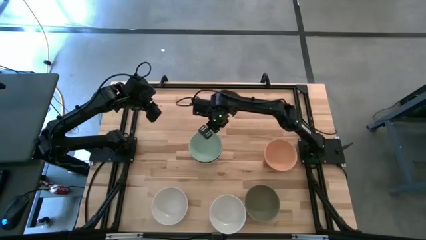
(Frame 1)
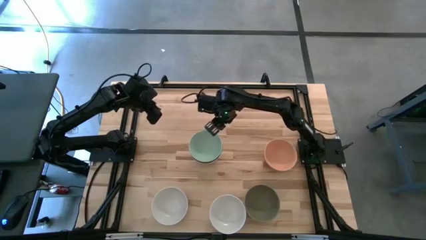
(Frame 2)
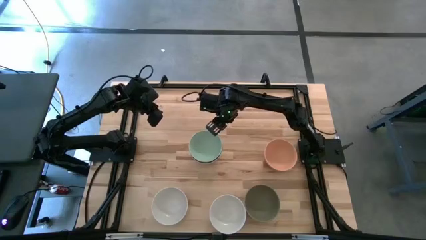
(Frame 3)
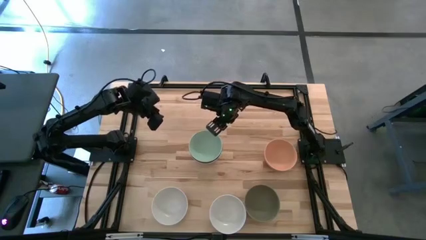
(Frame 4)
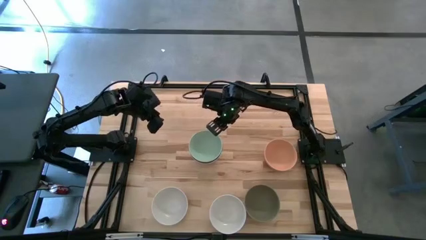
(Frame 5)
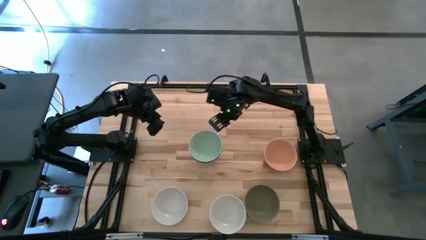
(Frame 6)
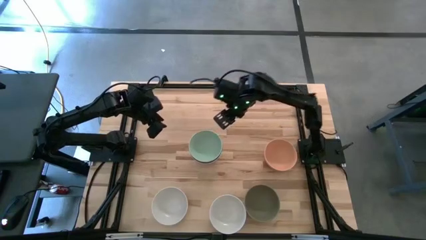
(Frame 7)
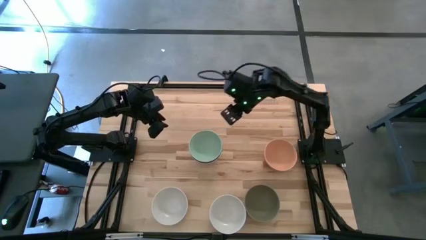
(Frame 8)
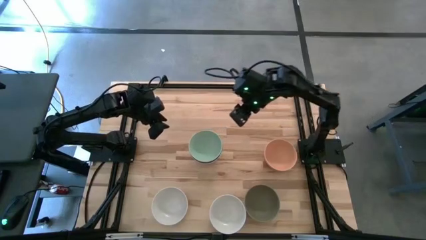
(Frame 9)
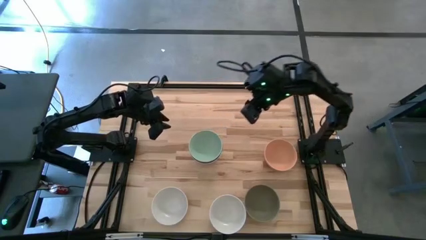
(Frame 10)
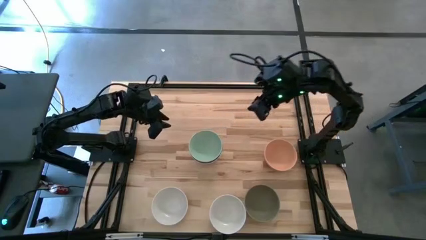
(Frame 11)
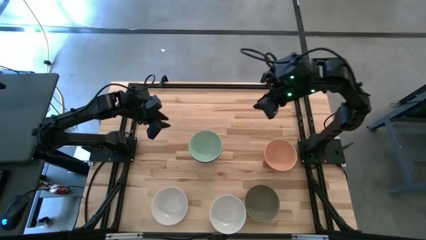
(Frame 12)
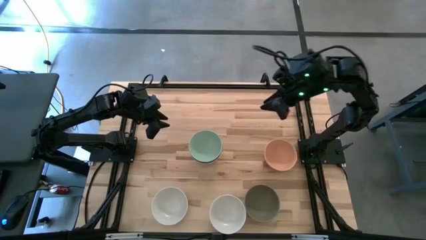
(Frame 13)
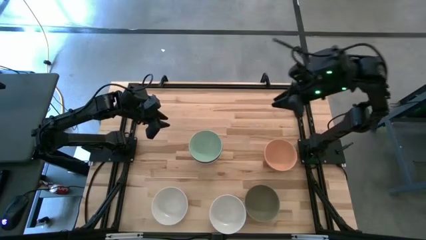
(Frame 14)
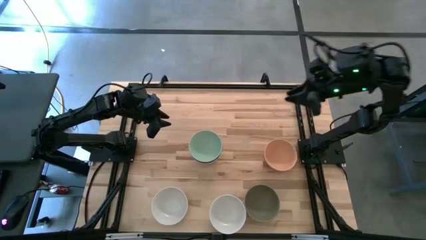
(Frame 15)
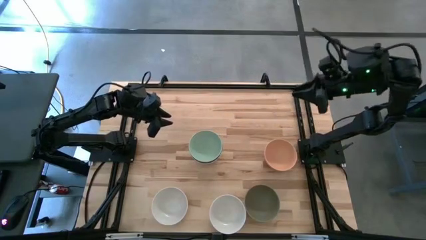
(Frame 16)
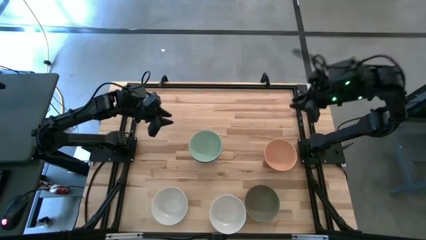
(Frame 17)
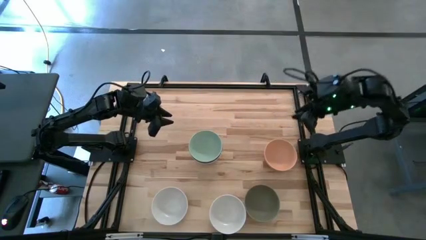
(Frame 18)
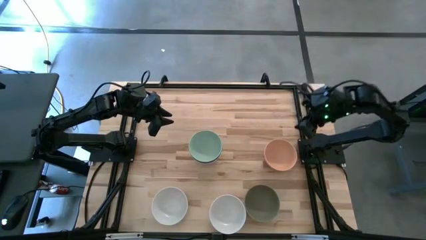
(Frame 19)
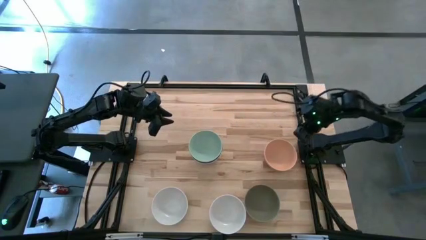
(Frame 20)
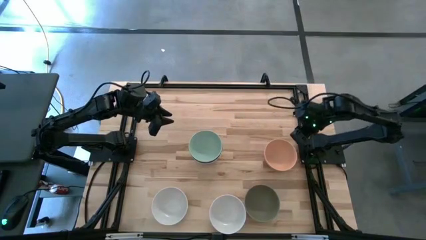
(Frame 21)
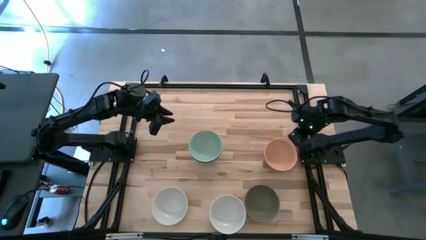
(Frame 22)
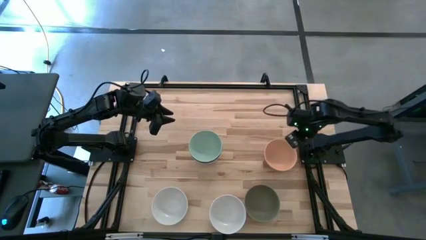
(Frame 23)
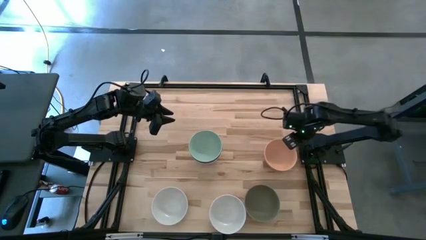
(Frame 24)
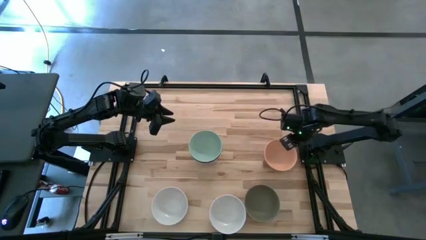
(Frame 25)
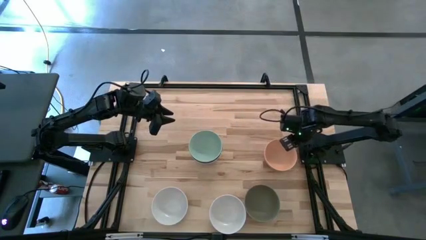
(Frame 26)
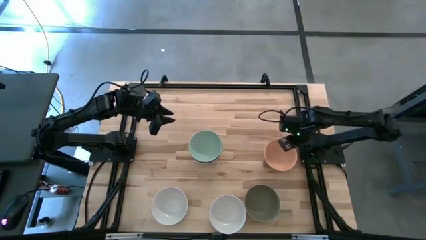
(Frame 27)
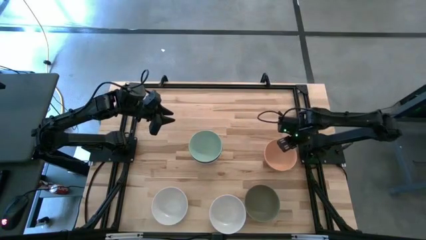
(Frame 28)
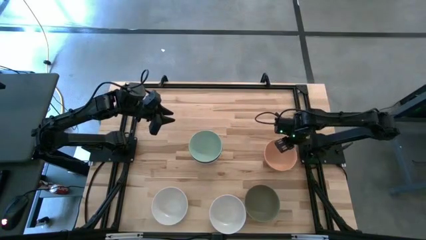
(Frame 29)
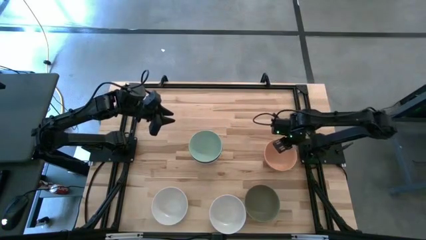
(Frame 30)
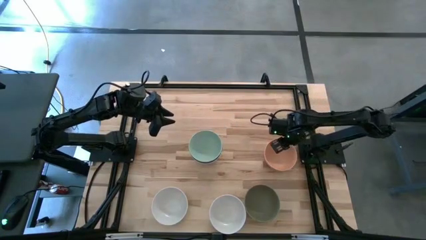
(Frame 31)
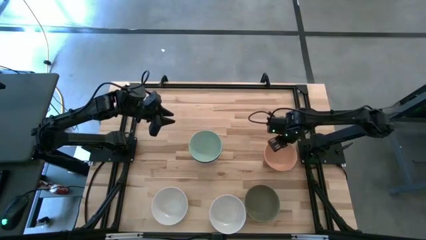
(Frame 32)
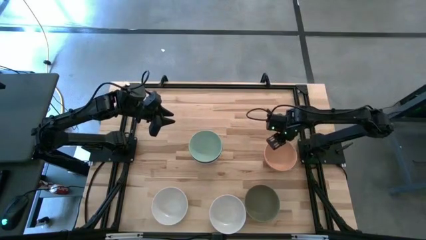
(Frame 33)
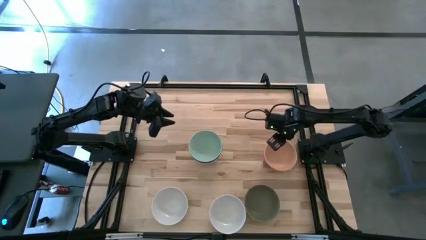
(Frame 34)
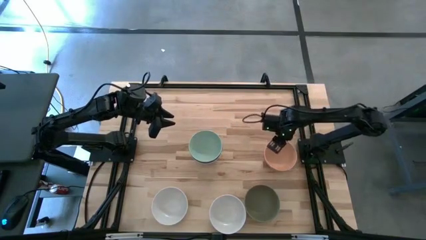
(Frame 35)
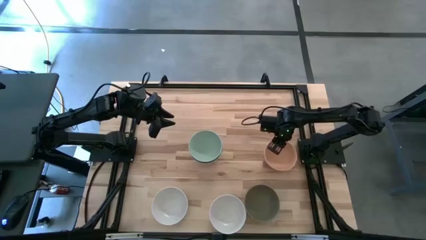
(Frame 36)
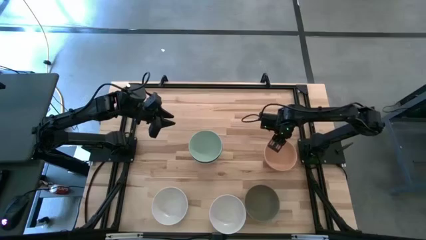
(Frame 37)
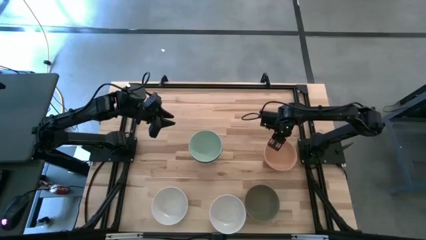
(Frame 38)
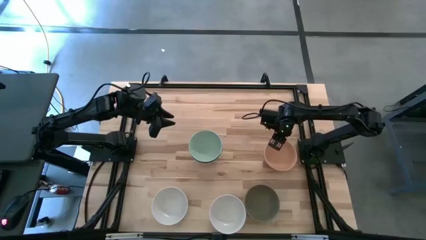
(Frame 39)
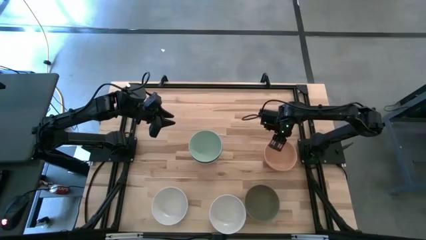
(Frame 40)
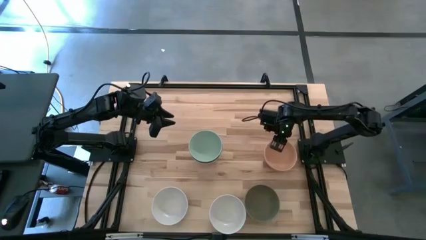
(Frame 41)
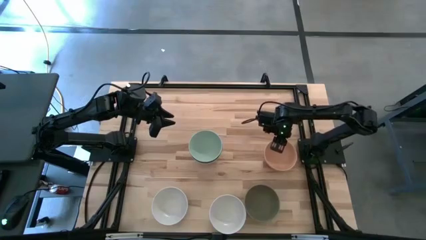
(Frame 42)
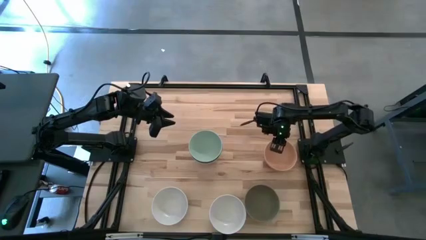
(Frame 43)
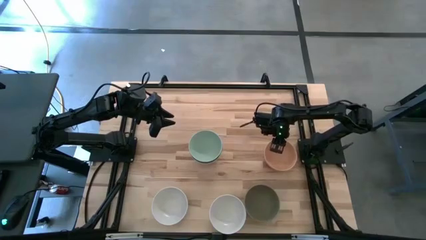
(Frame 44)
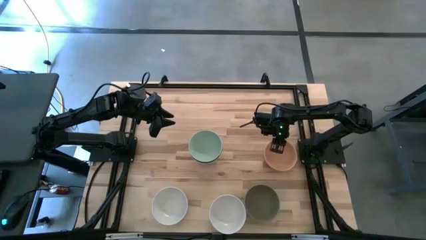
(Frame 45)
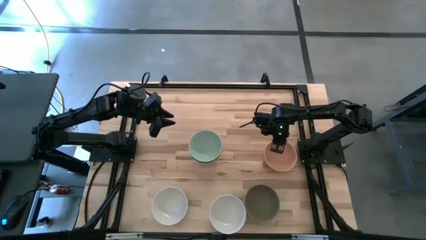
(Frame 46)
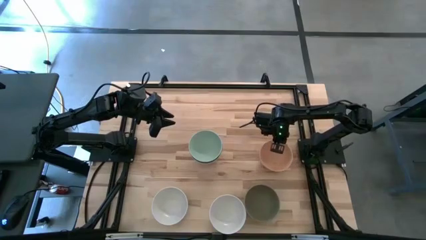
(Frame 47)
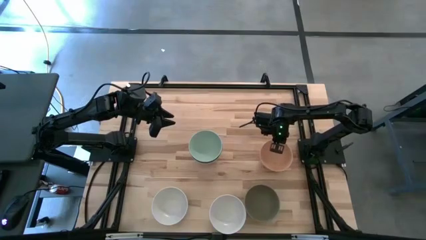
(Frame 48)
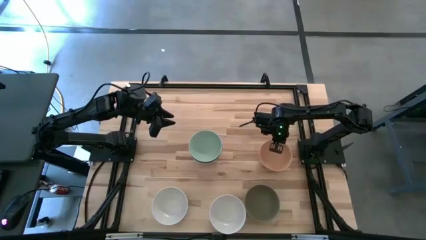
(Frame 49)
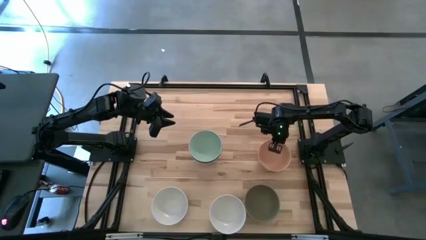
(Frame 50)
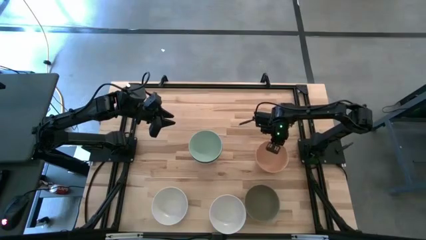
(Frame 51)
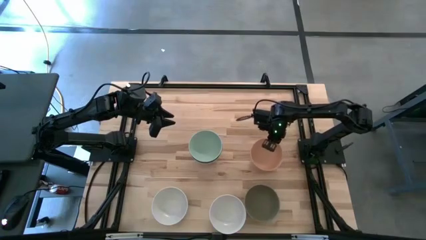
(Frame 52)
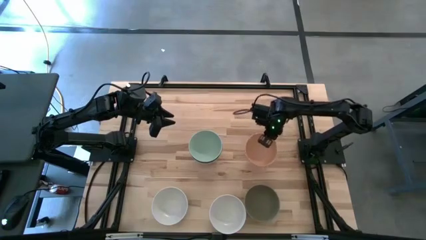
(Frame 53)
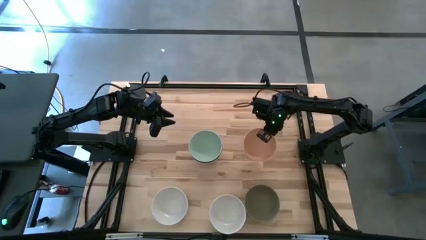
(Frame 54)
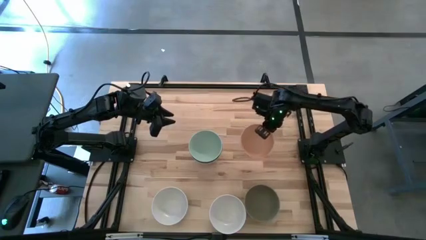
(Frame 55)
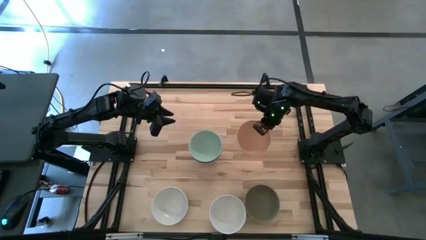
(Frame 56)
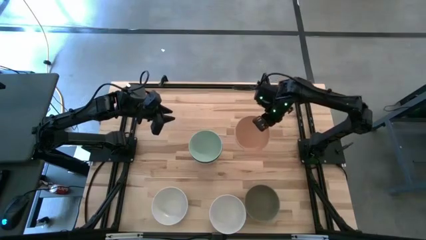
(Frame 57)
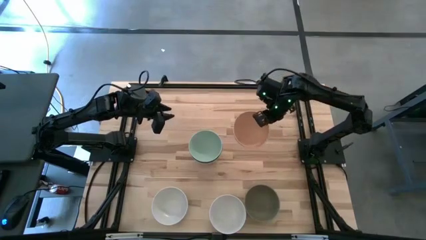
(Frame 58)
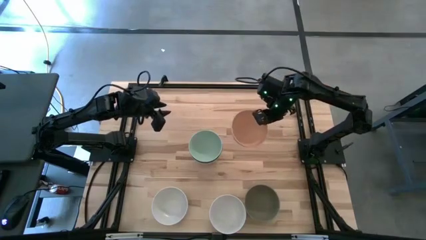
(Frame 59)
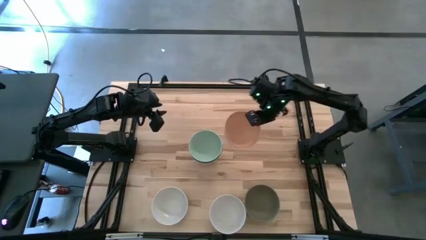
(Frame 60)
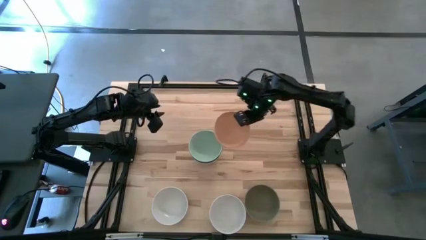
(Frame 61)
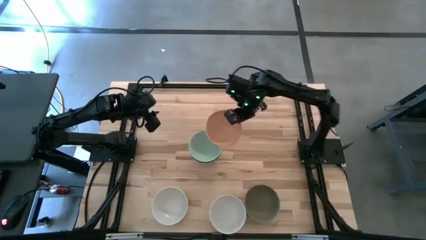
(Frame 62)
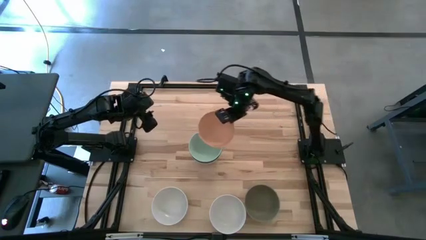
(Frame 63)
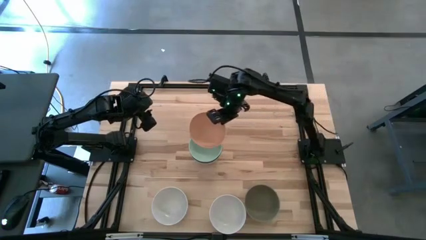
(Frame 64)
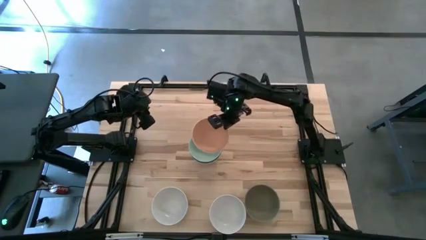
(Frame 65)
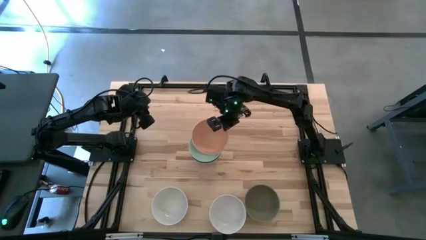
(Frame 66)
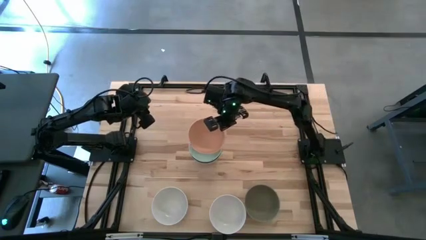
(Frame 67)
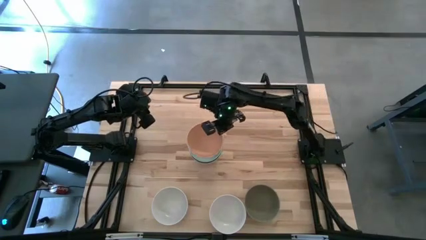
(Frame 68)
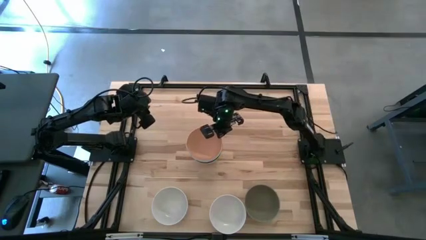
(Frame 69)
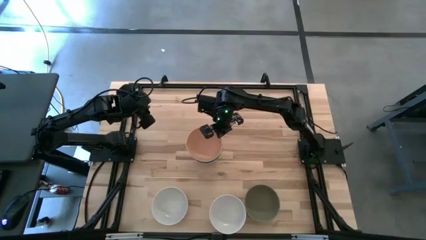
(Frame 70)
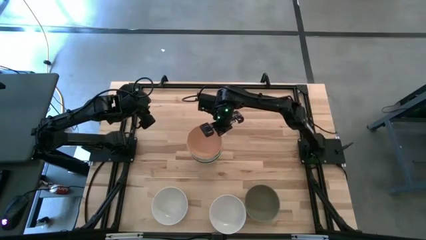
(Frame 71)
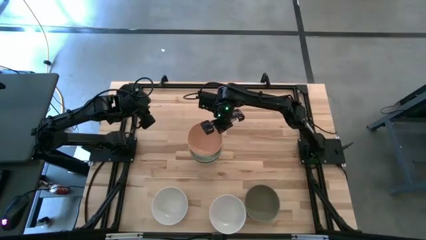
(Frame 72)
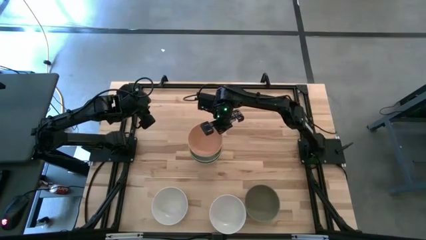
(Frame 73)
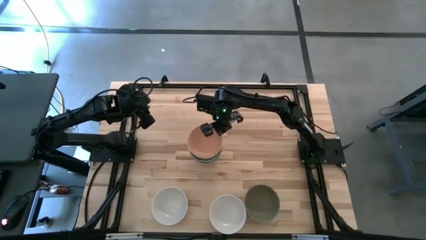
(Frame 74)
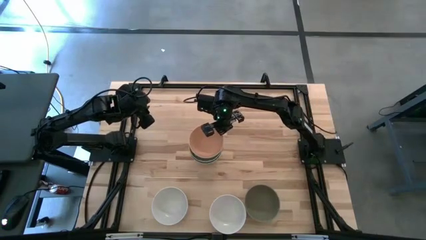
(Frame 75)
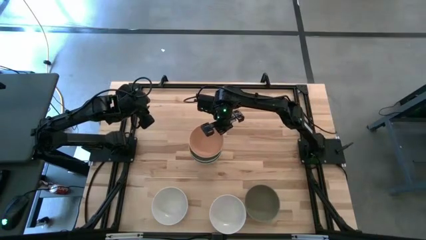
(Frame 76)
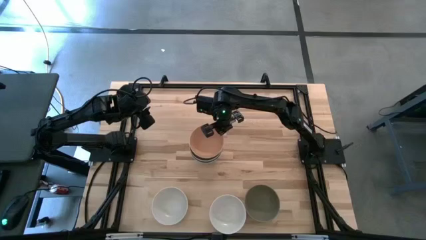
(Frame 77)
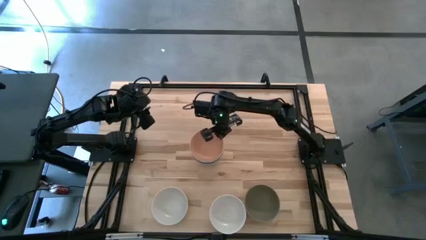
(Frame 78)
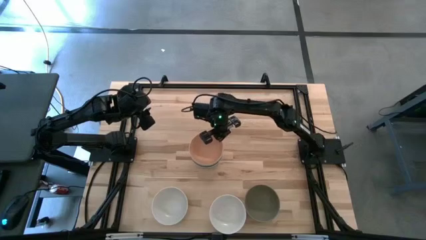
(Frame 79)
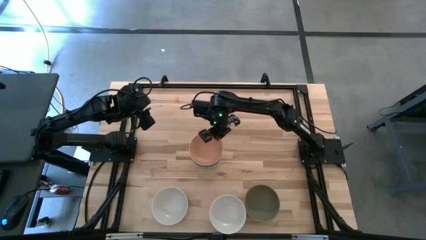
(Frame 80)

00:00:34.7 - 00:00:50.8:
Task: Nest bowls inside each other
Stack the light orange bowl on the green bowl
